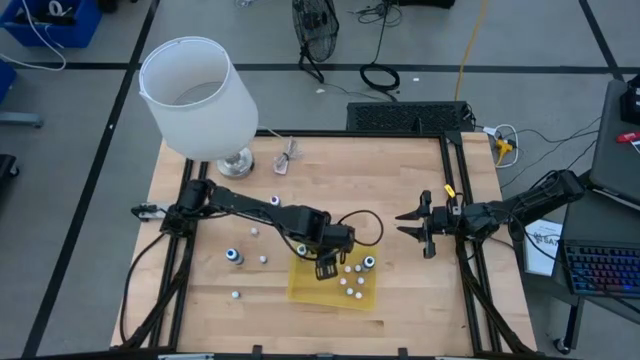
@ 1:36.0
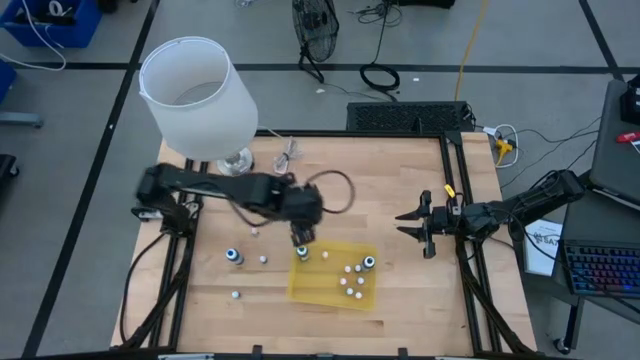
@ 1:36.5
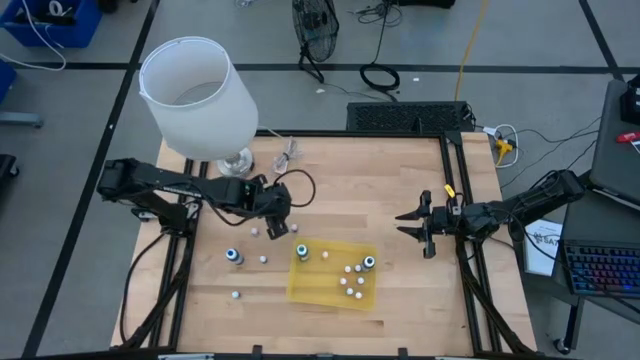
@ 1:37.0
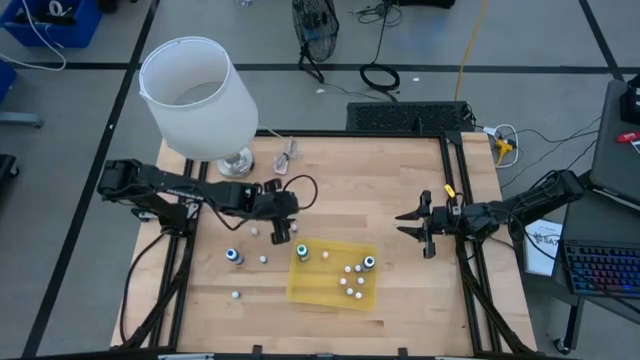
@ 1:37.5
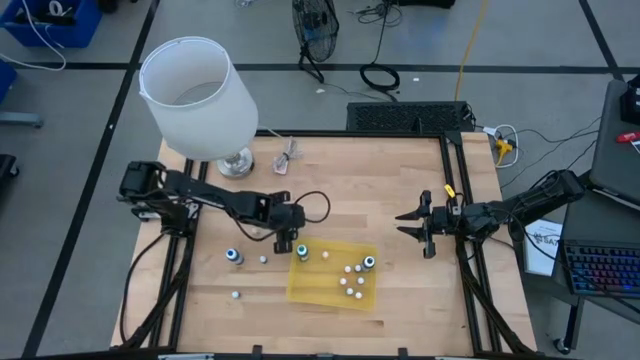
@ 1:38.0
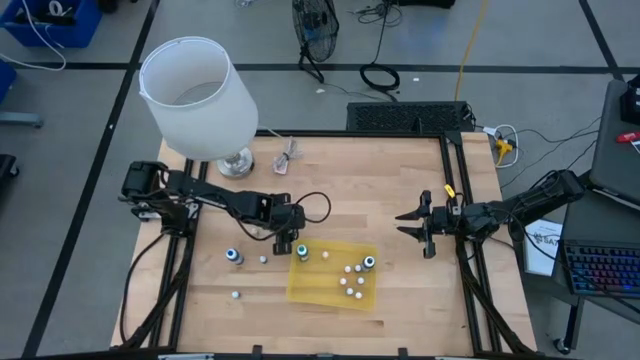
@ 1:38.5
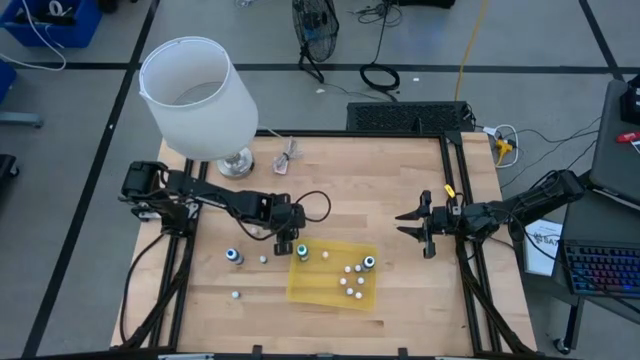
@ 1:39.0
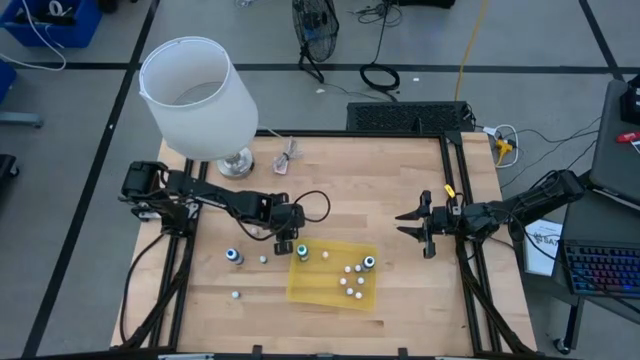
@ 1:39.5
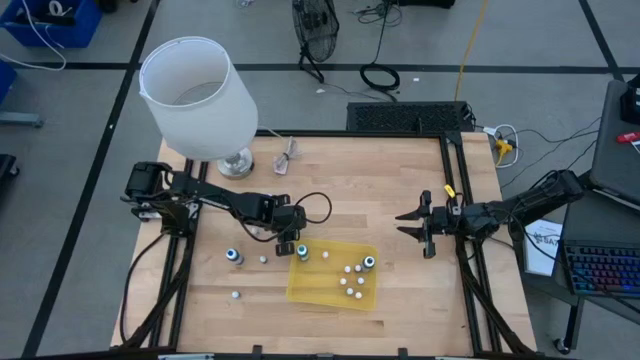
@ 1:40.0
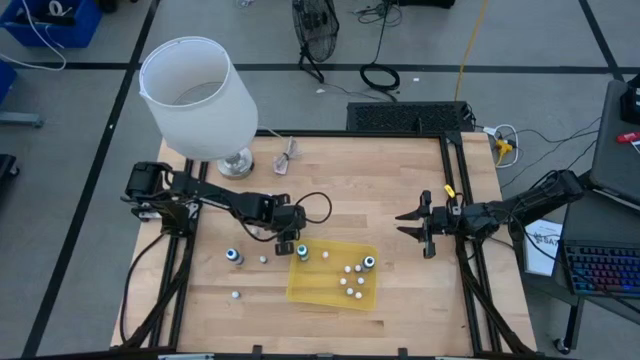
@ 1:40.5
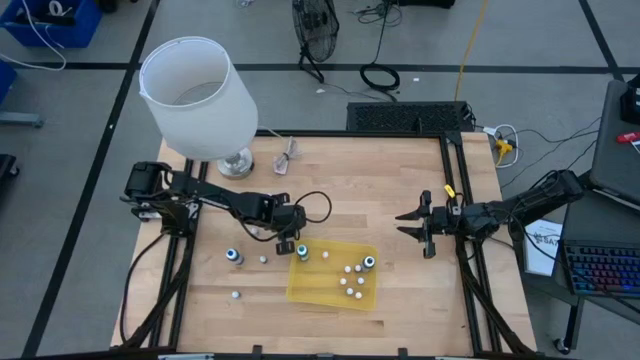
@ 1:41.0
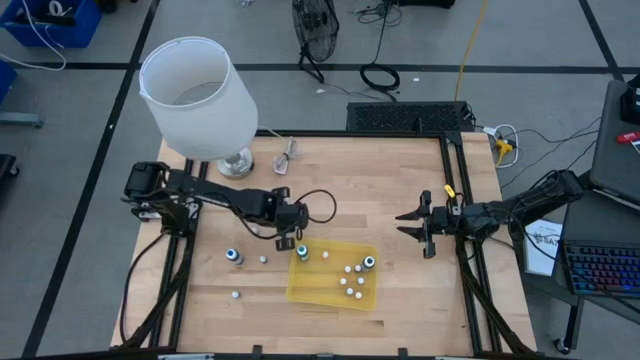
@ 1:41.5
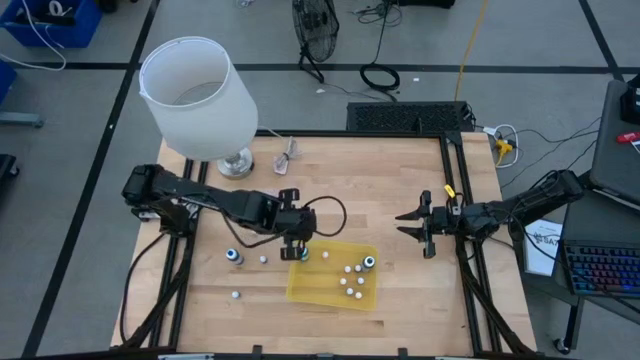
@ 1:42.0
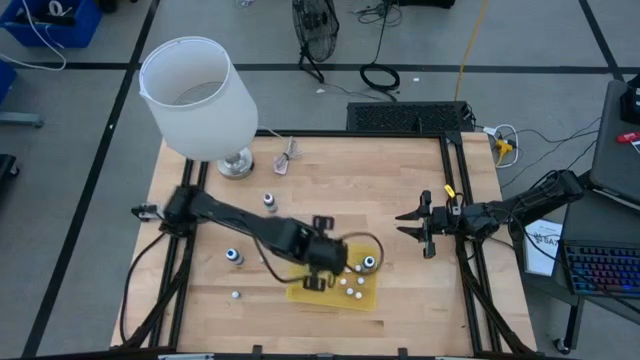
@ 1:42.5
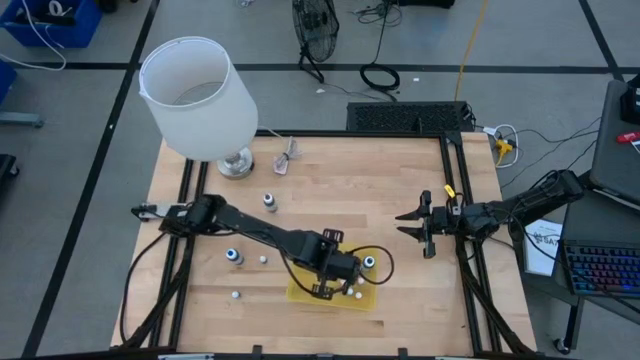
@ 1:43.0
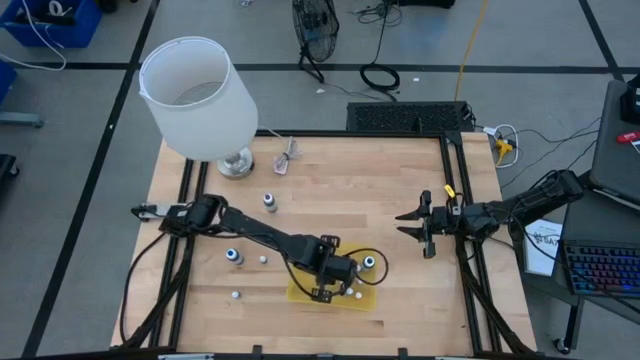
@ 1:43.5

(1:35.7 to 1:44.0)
Task: Pick & Place food coloring
Put the small dark blue food coloring bottle into the yellow container

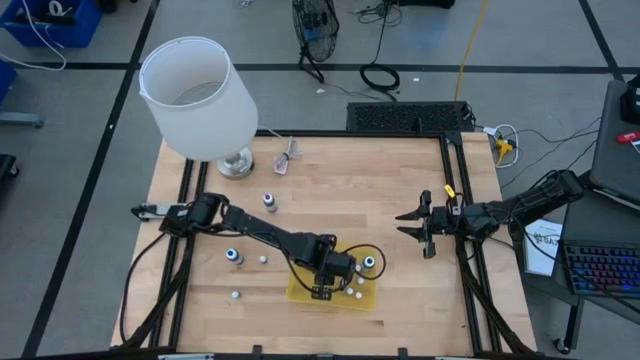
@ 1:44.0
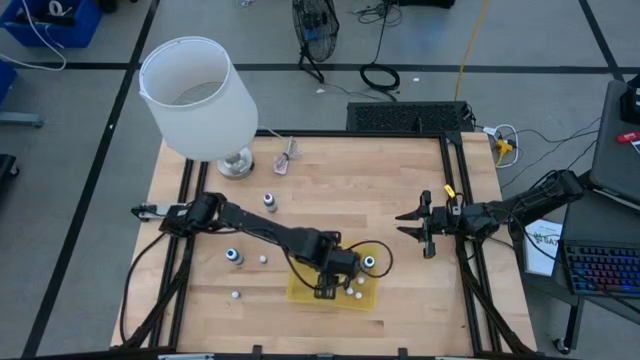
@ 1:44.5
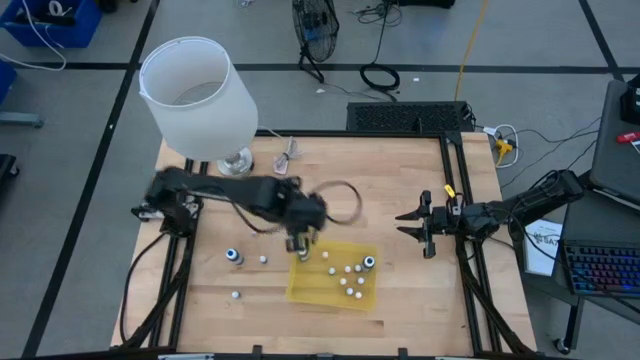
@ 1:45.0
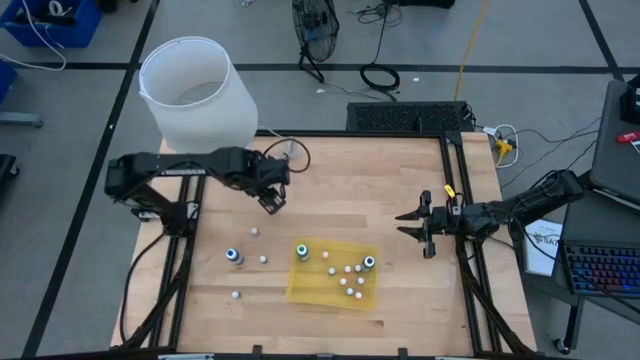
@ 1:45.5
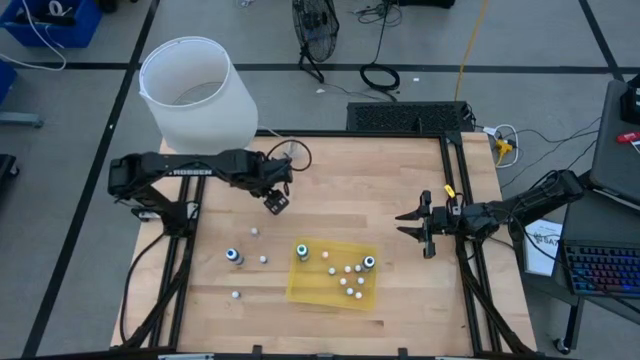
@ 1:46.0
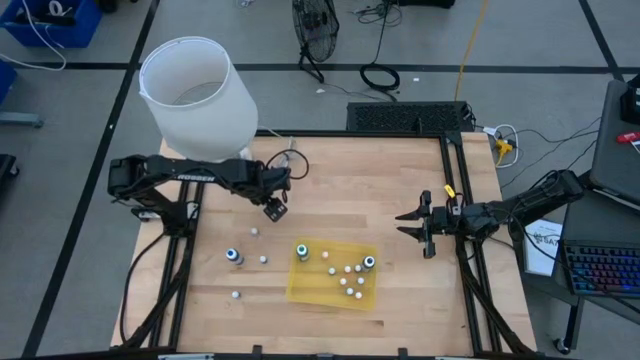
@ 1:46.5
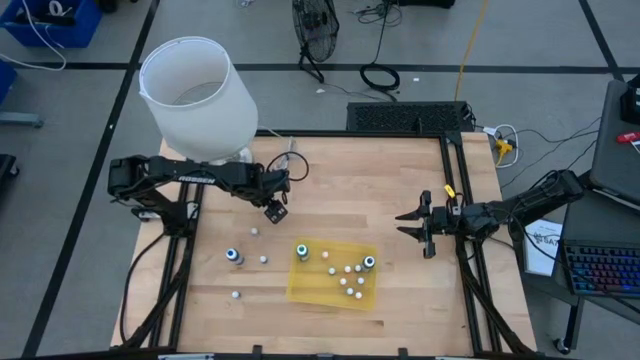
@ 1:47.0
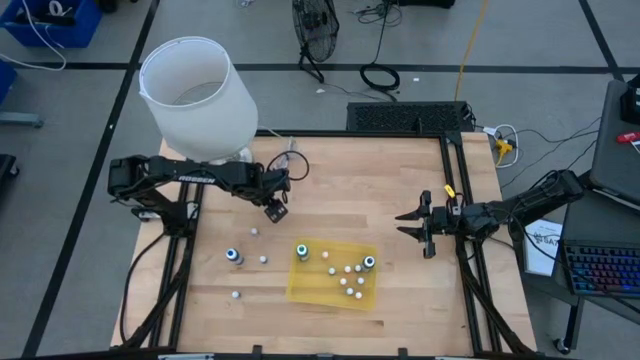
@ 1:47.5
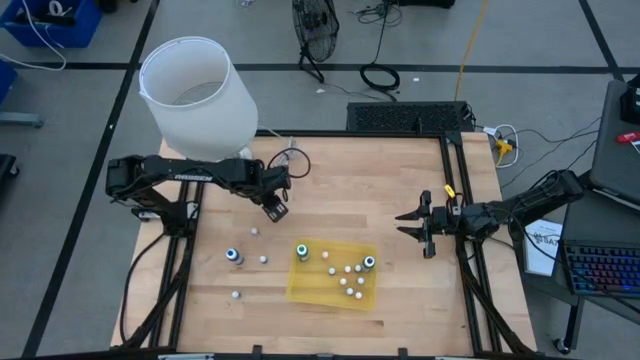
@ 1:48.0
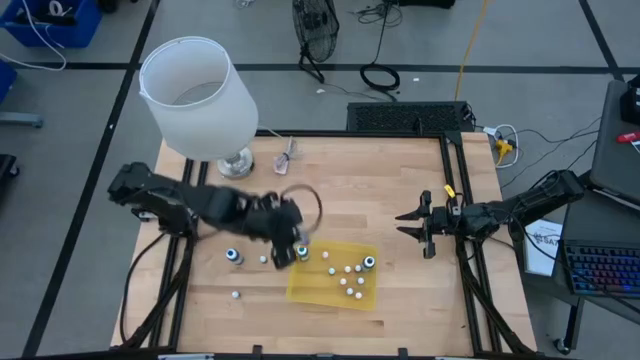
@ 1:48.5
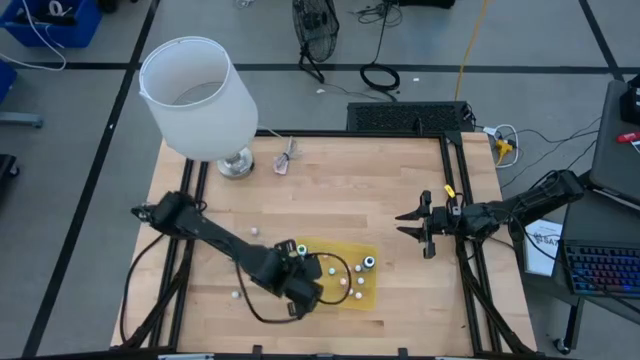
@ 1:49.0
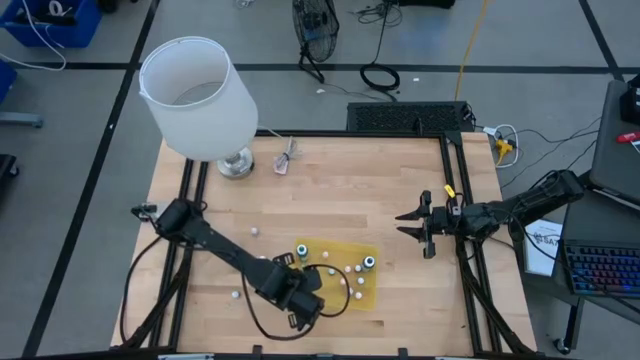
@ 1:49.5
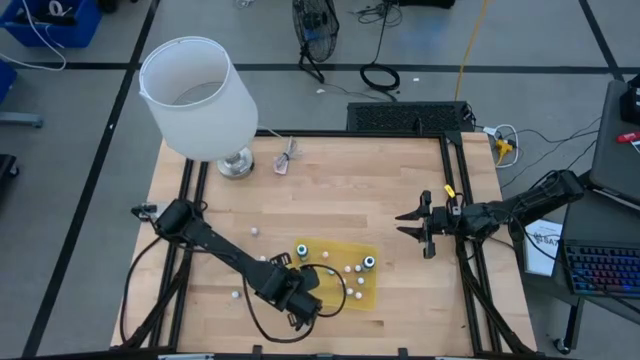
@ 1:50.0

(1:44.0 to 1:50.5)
Put the large purple food coloring bottle into the yellow container

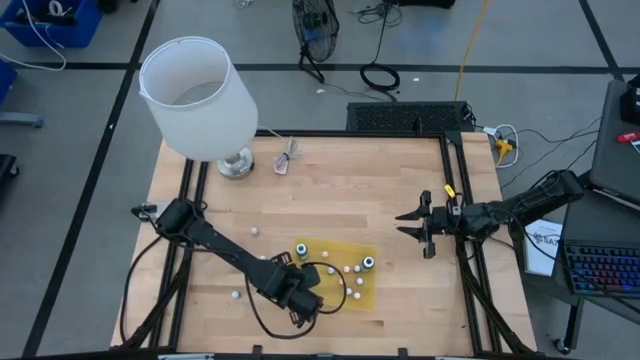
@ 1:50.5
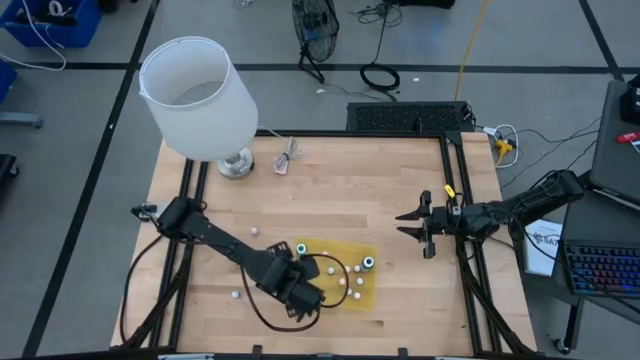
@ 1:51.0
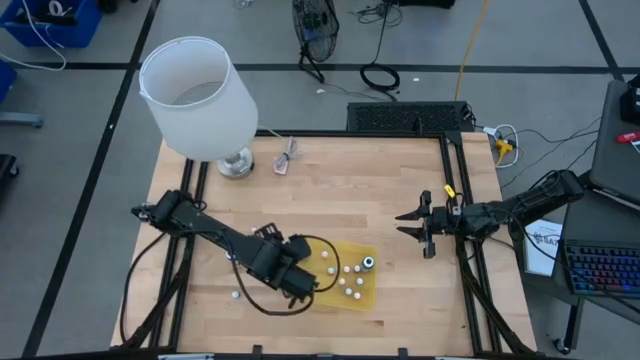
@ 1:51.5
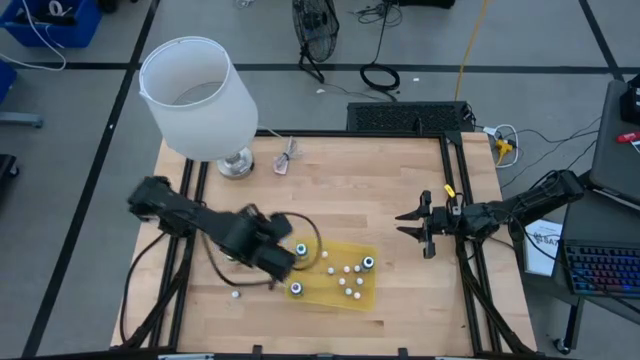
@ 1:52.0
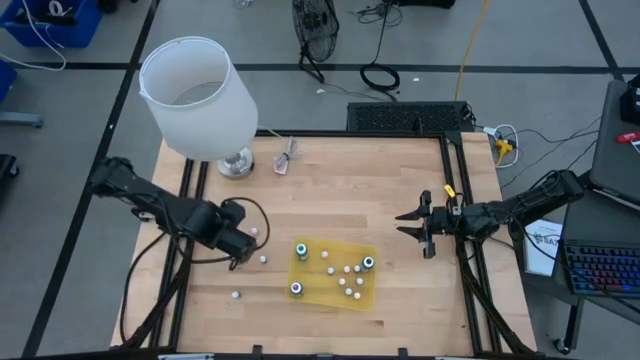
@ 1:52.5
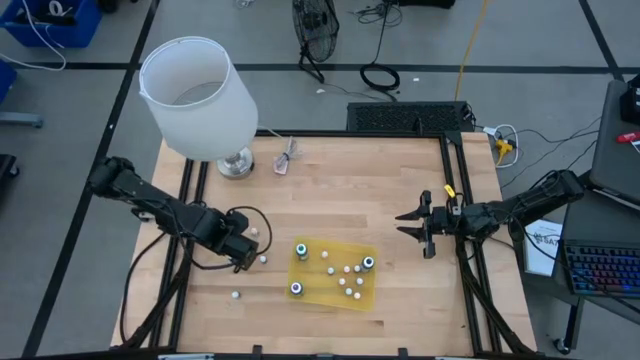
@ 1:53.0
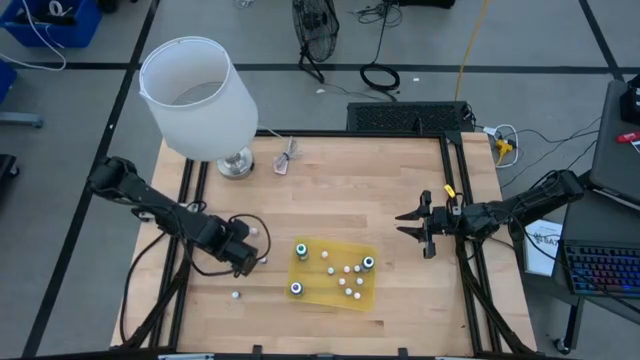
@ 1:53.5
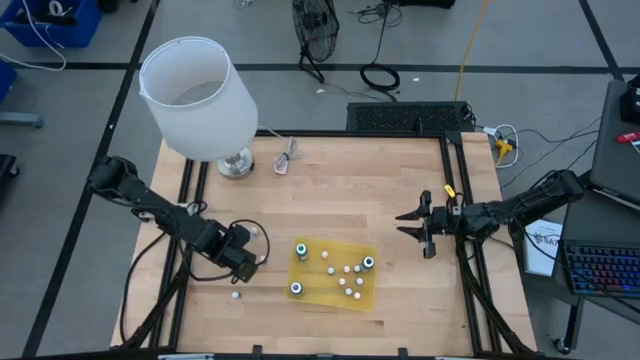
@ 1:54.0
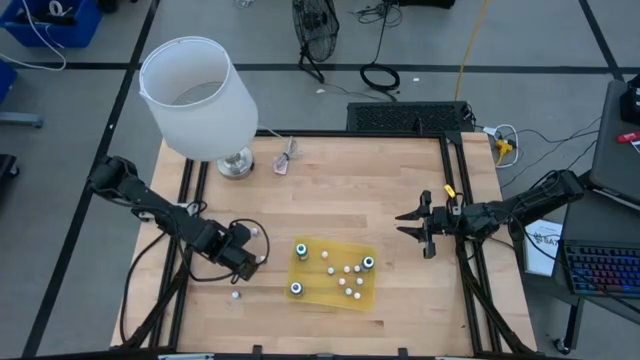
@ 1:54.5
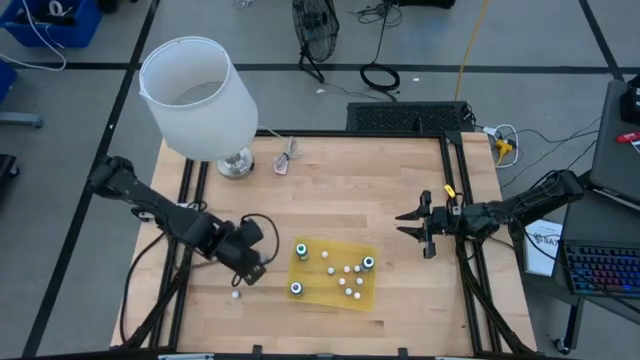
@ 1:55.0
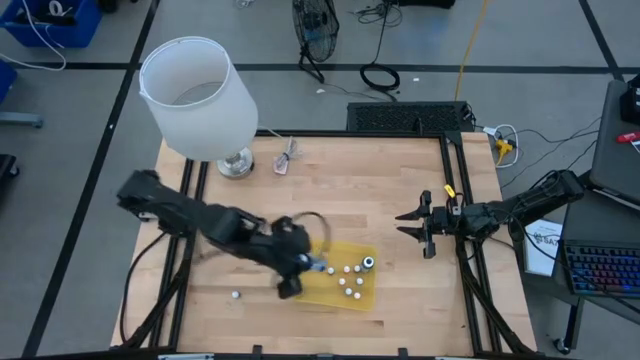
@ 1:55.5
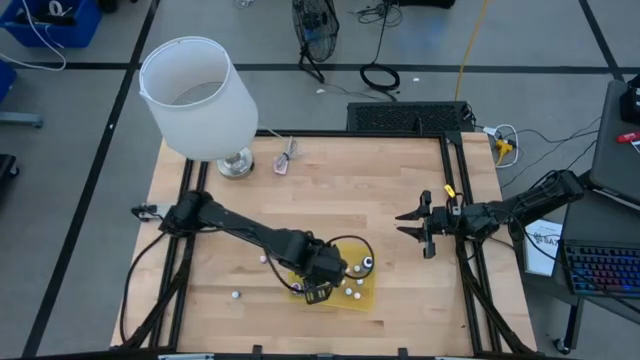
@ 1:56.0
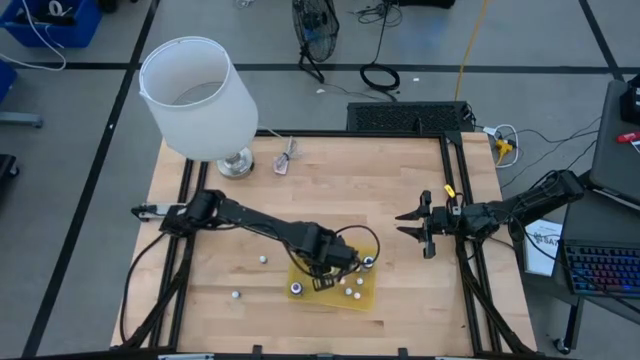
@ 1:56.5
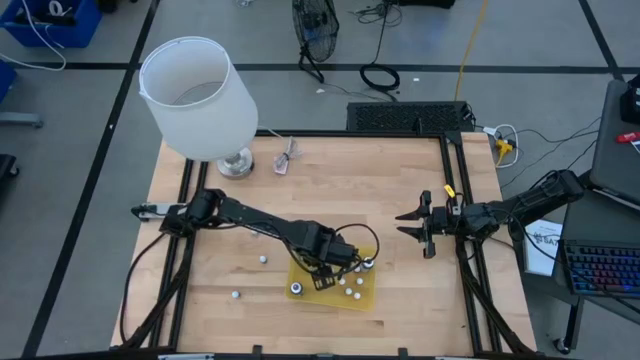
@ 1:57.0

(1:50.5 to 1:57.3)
Put the large blue food coloring bottle into the yellow container
